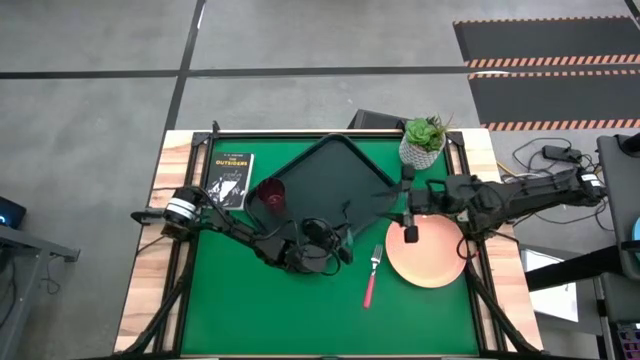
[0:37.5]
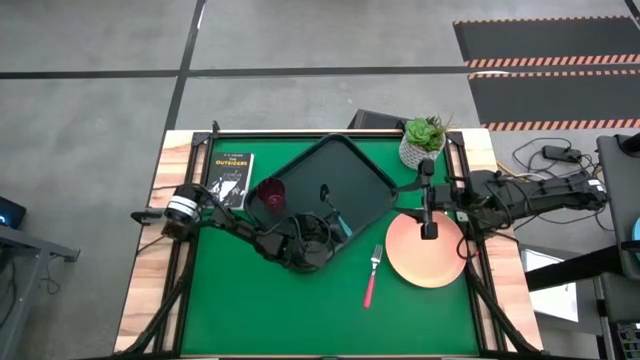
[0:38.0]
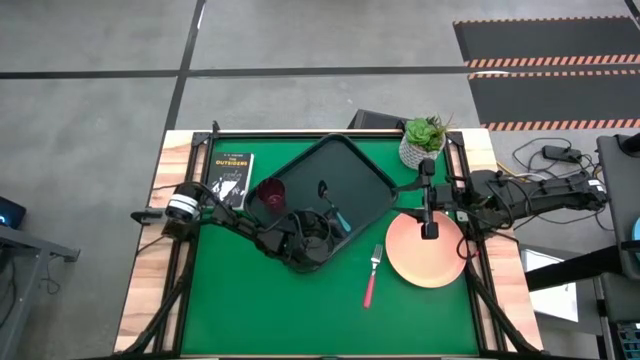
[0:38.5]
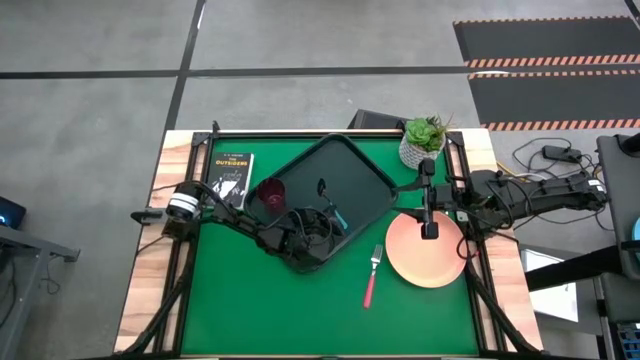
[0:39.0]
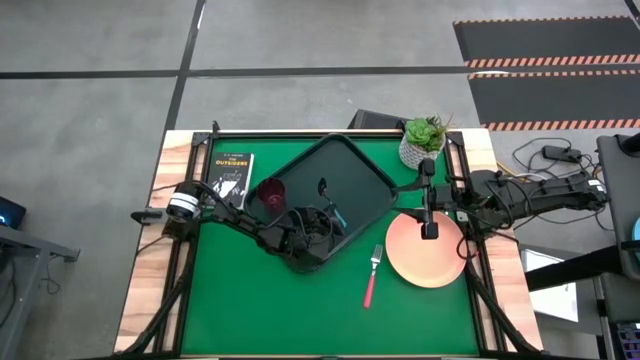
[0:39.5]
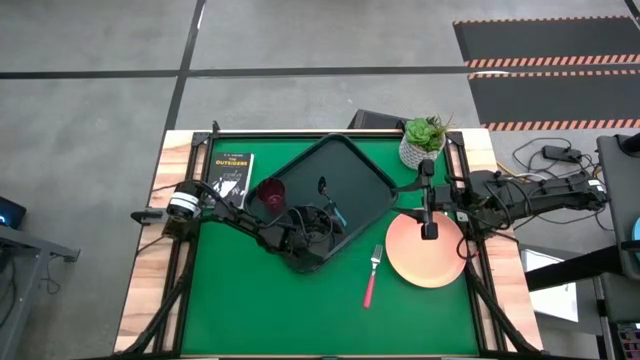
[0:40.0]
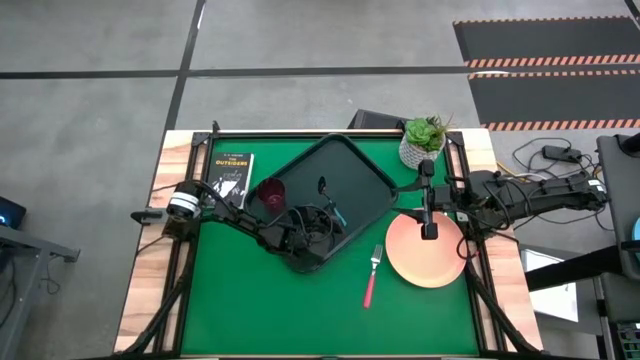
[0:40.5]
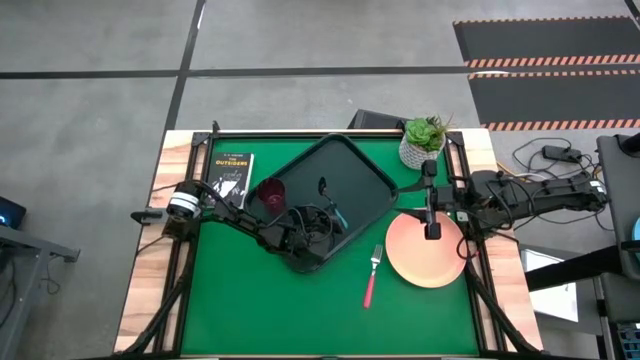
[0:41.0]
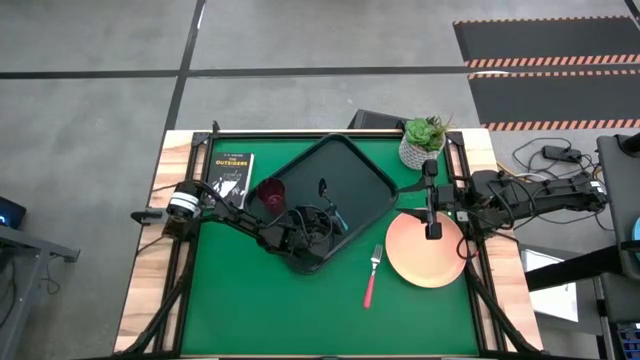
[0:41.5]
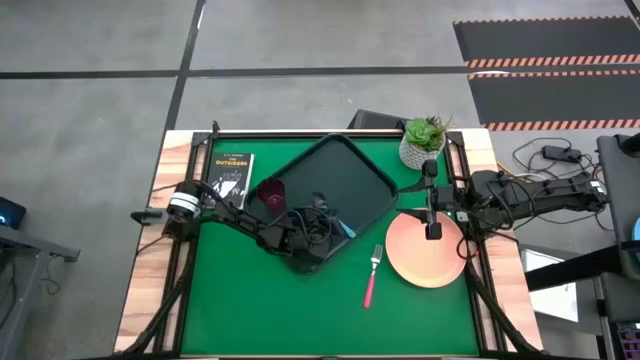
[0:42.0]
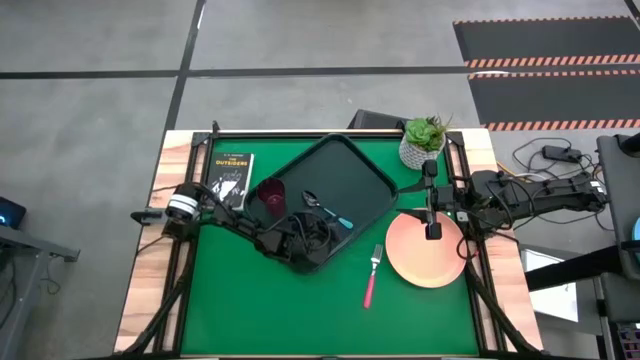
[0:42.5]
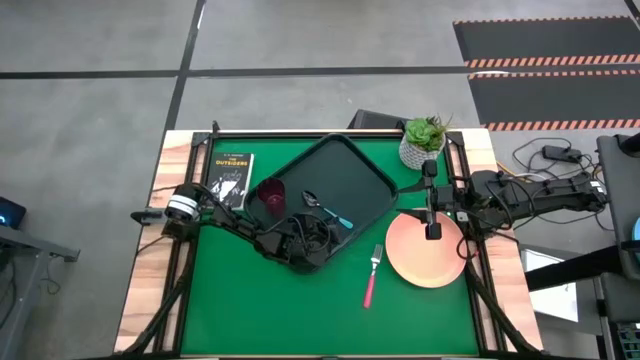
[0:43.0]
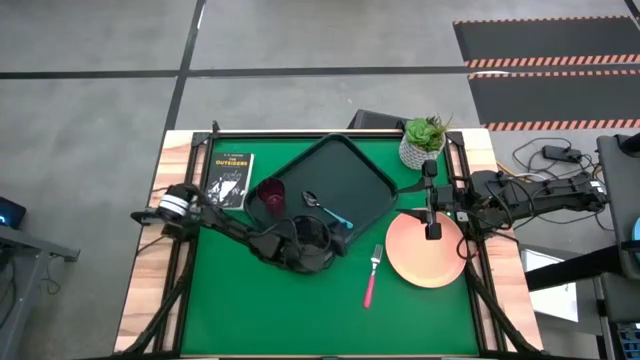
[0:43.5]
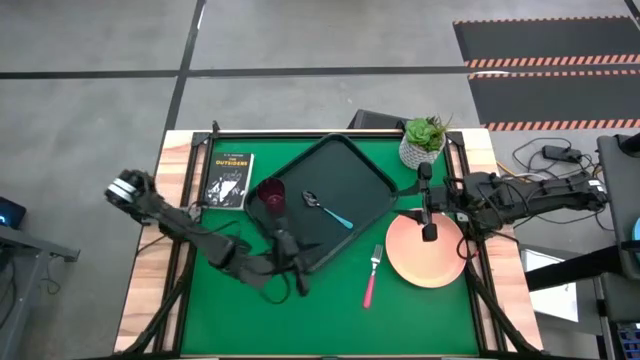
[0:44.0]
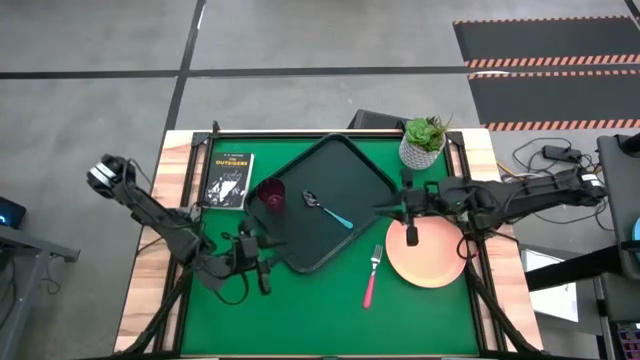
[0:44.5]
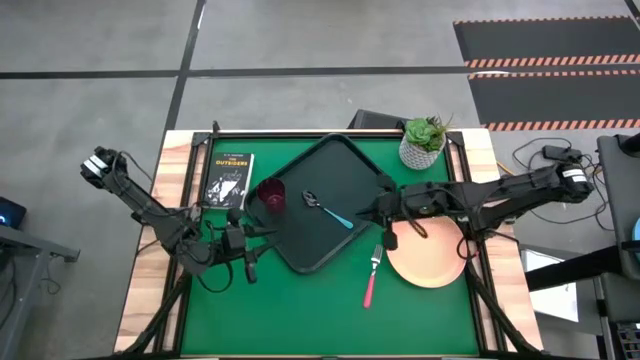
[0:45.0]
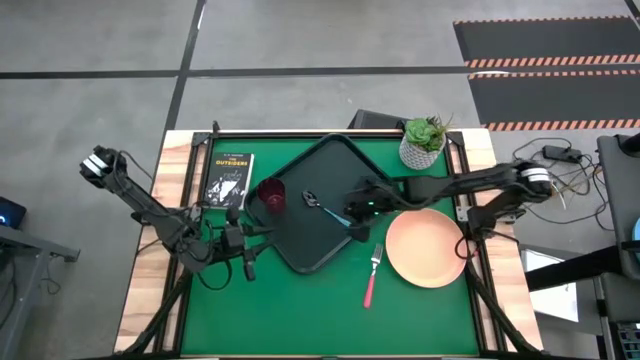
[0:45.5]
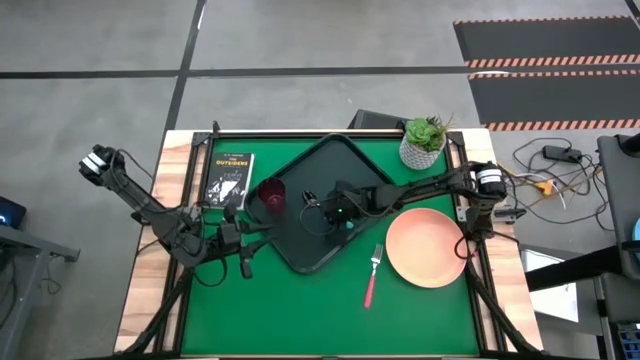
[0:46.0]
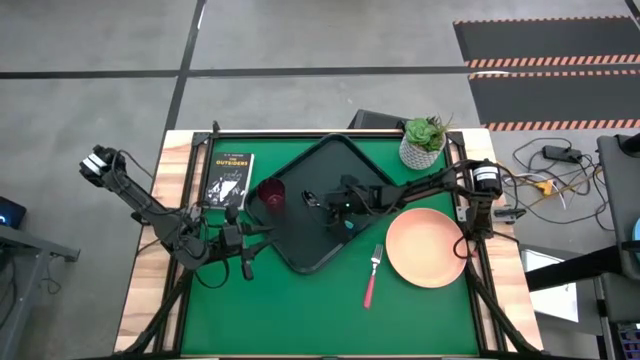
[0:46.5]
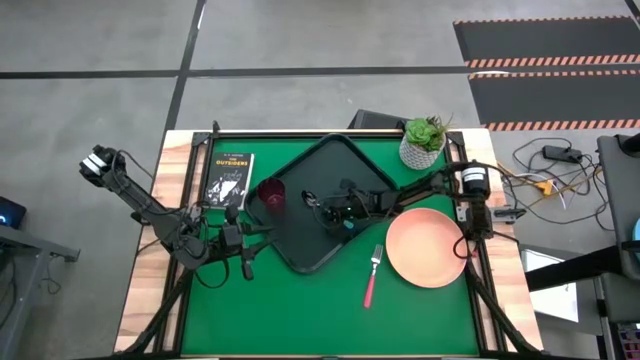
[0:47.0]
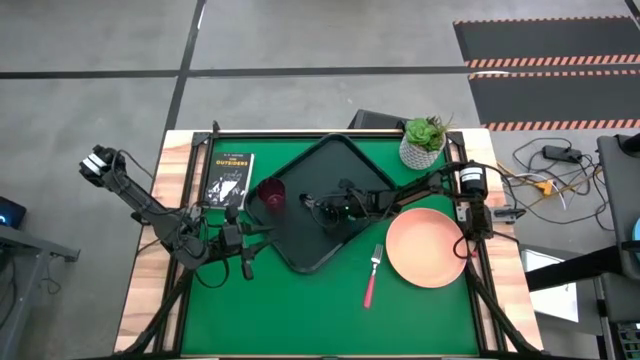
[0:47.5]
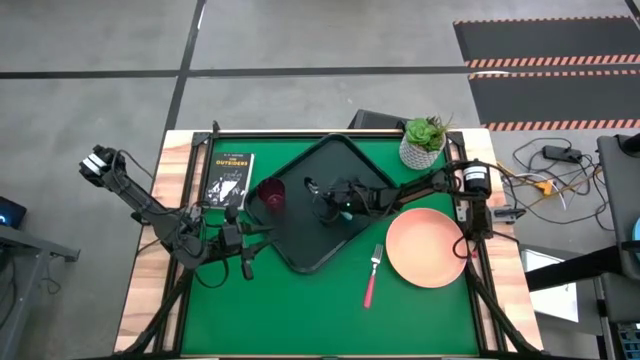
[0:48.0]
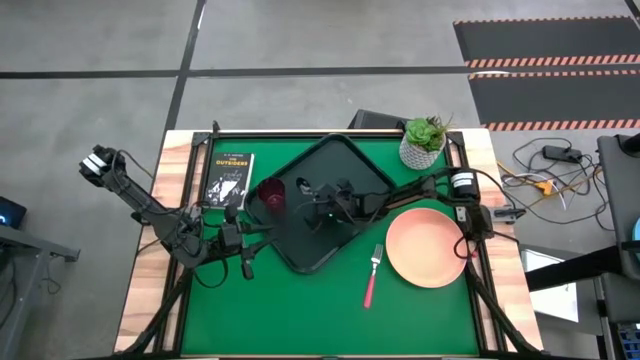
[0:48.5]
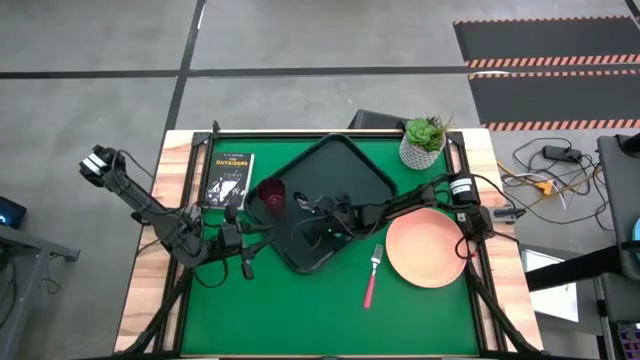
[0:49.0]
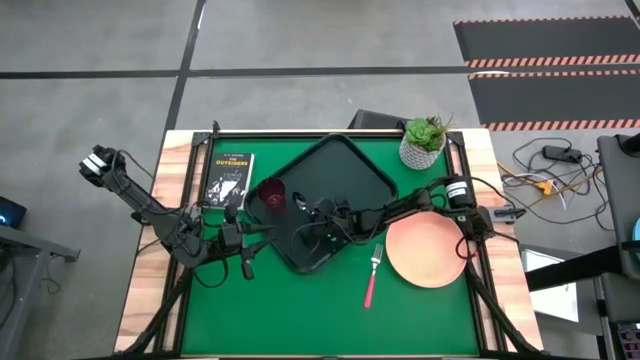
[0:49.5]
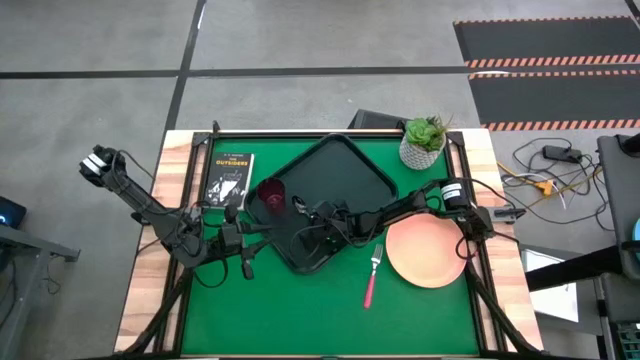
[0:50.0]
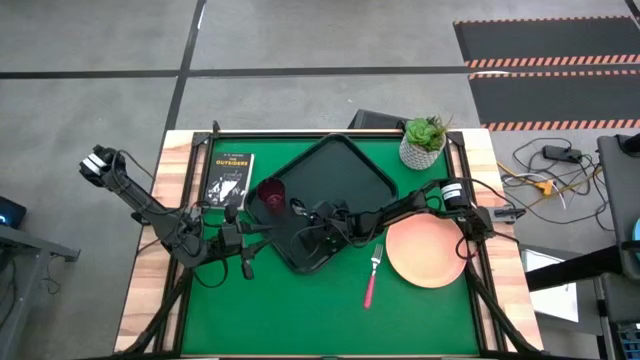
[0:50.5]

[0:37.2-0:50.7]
Task: Pick and place plate/cup/fork/spoon on tray
Put the blue spoon on the black serving tray to the bottom right of the red glass

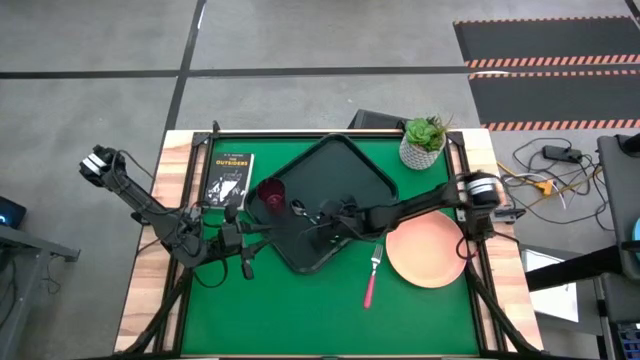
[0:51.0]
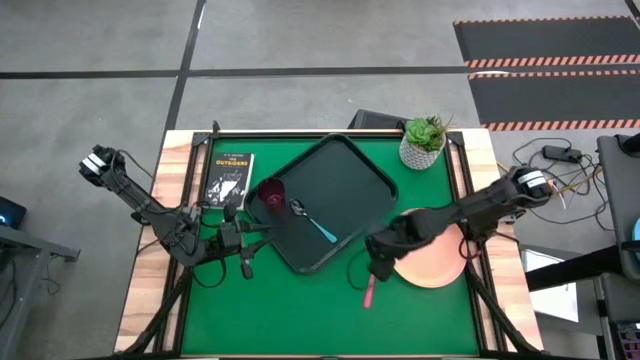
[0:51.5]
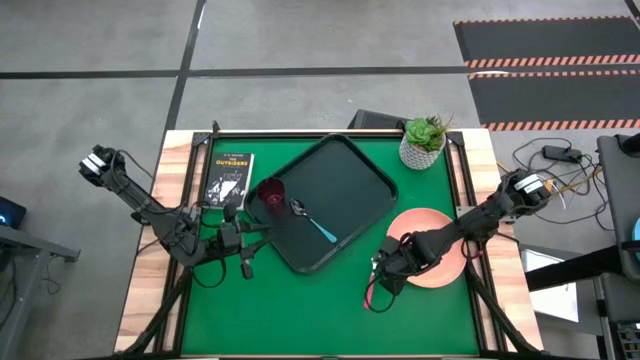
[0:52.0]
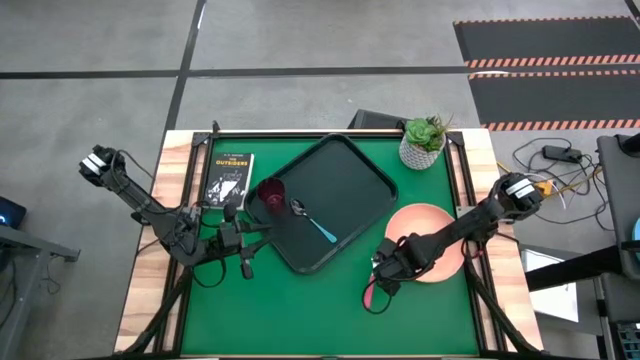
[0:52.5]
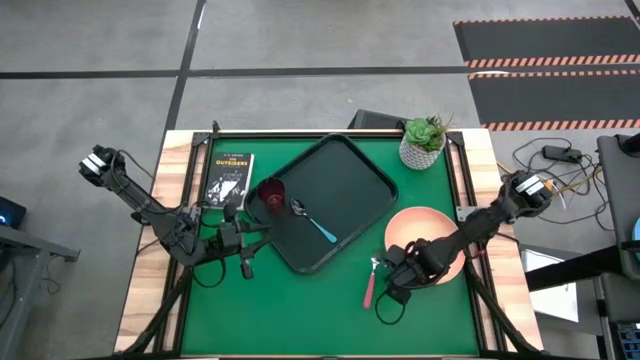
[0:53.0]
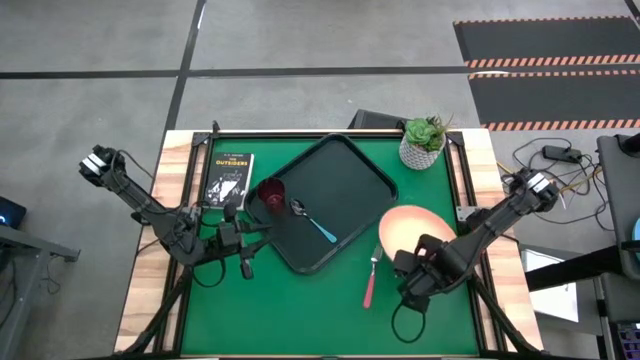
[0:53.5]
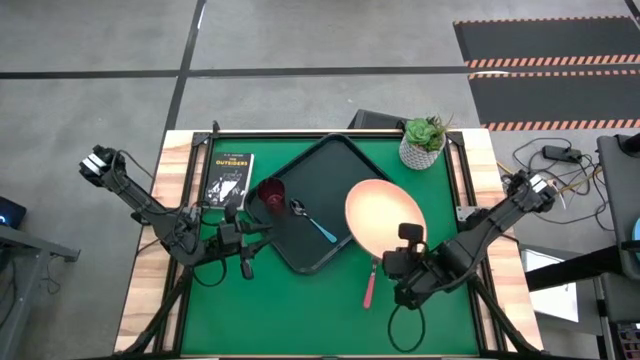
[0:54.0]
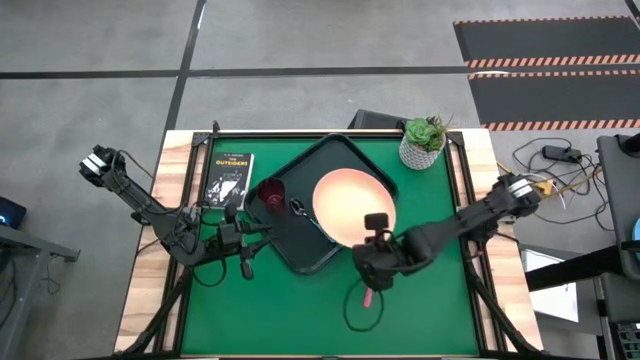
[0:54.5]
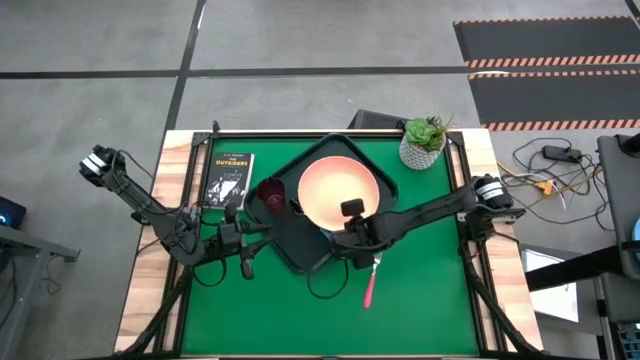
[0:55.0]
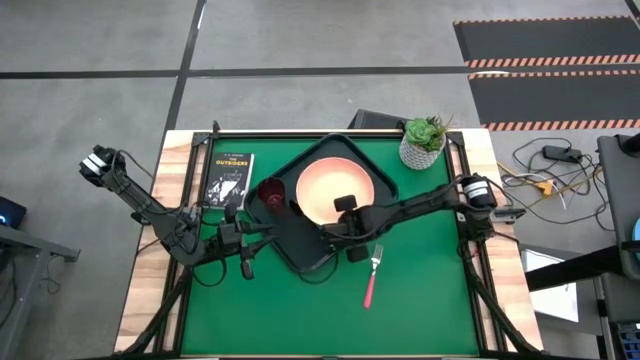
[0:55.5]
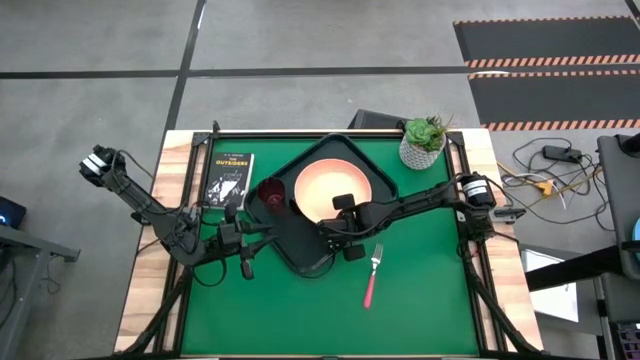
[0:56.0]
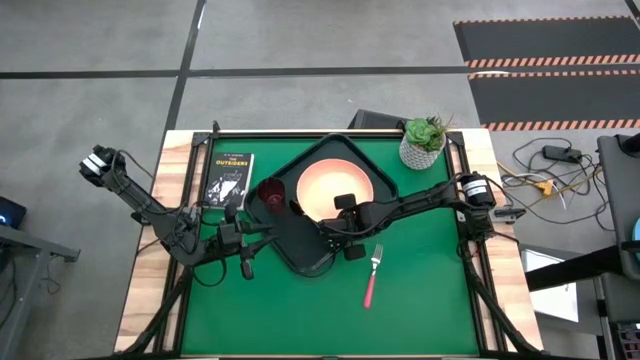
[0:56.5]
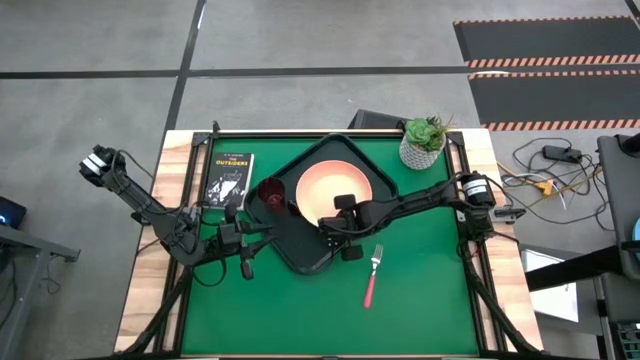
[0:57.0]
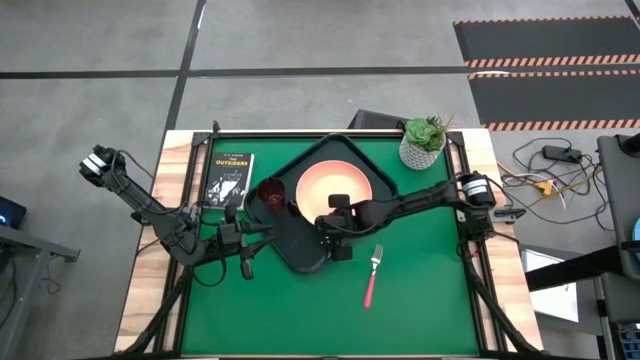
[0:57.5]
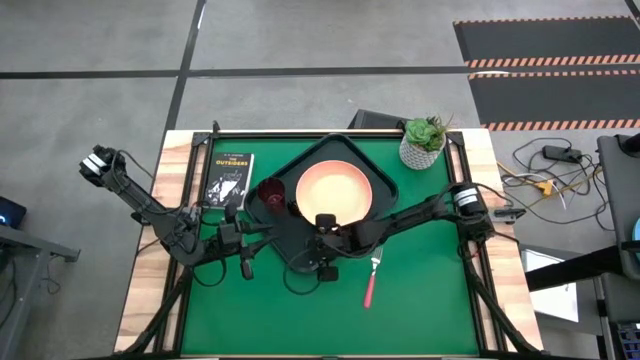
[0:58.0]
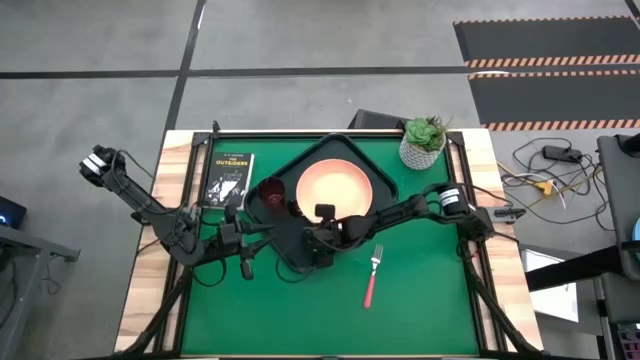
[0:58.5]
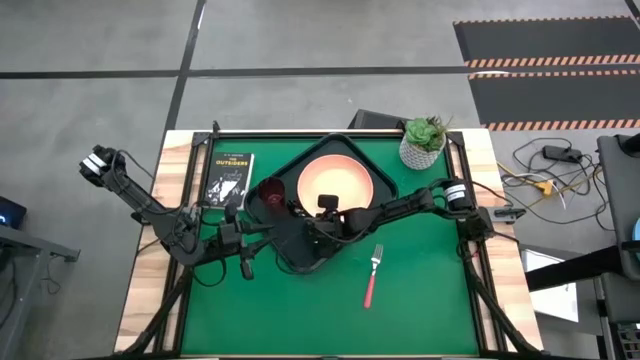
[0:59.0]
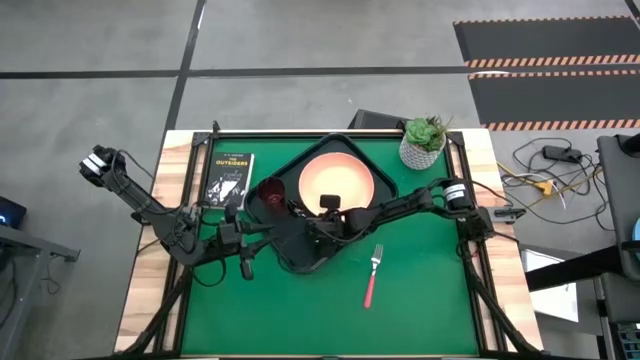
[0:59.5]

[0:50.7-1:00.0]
Put the orange plate on the black serving tray to the right of the blue spoon
